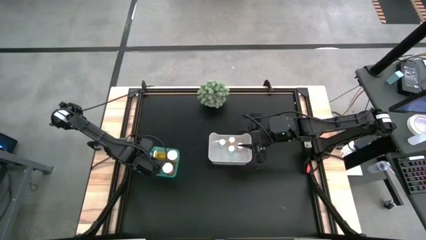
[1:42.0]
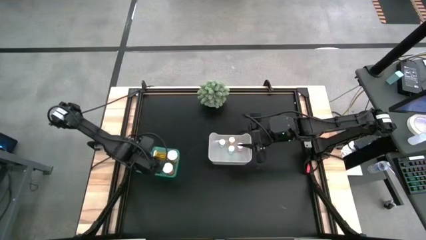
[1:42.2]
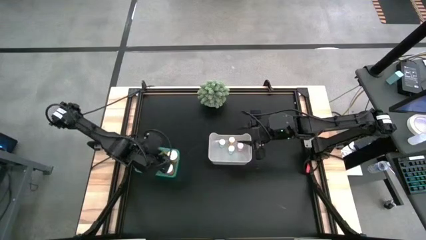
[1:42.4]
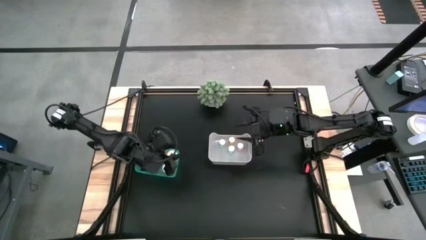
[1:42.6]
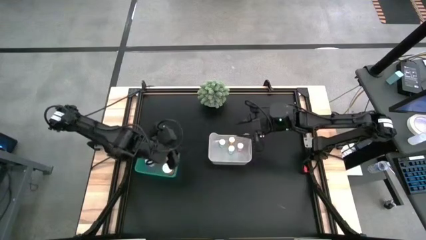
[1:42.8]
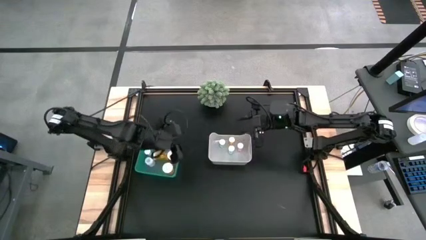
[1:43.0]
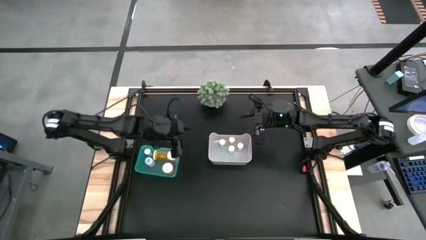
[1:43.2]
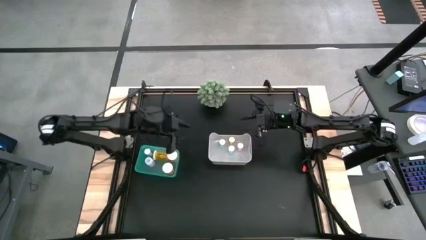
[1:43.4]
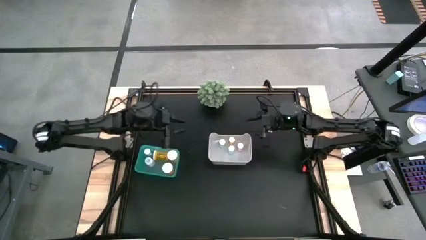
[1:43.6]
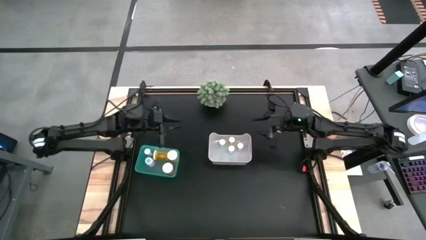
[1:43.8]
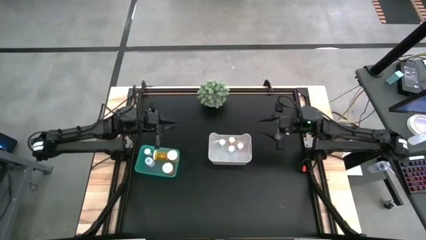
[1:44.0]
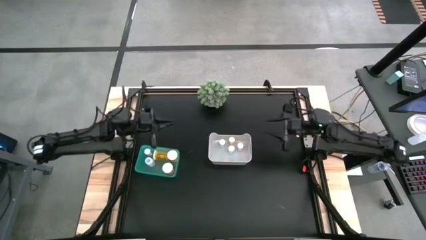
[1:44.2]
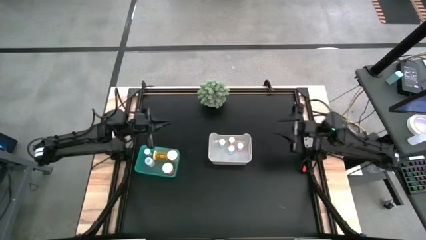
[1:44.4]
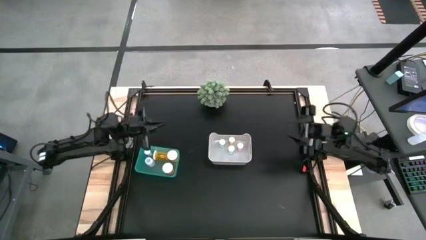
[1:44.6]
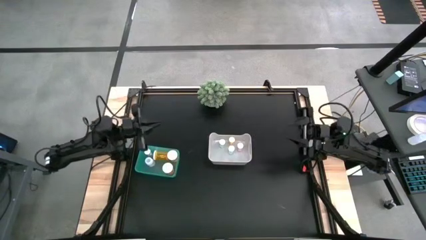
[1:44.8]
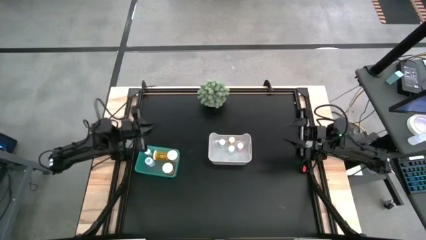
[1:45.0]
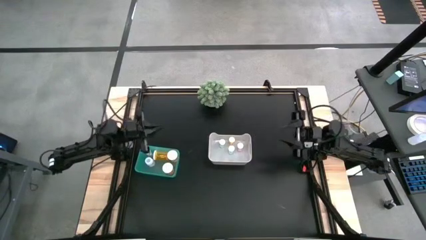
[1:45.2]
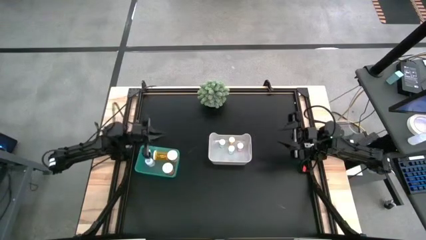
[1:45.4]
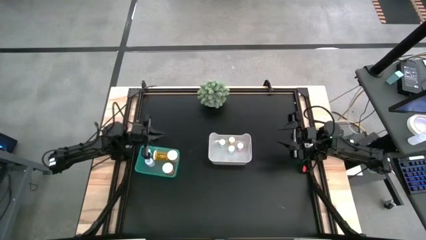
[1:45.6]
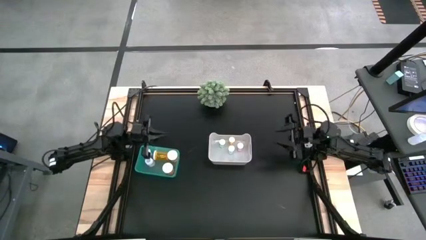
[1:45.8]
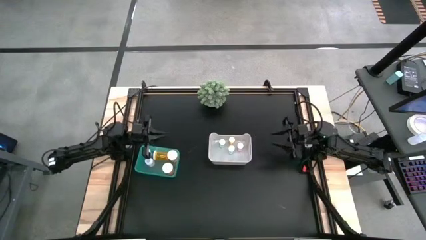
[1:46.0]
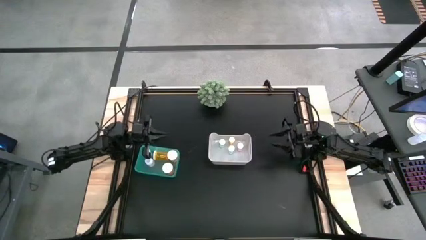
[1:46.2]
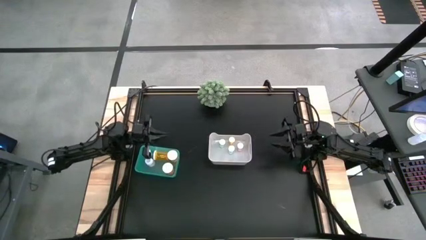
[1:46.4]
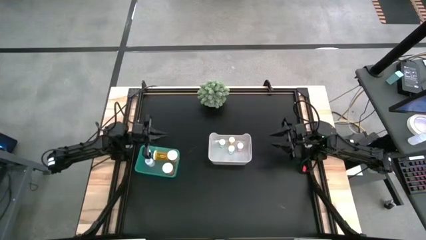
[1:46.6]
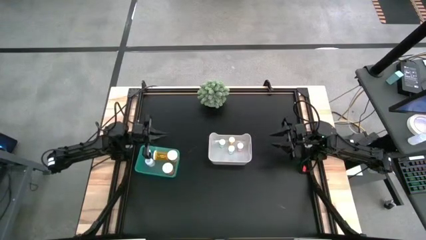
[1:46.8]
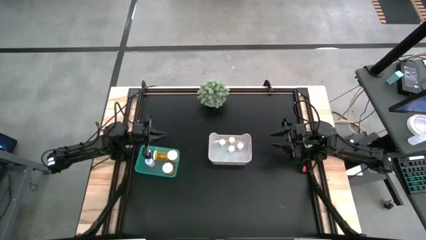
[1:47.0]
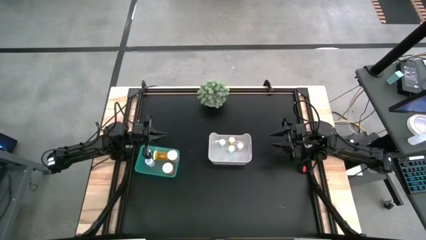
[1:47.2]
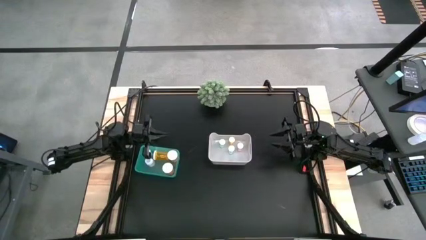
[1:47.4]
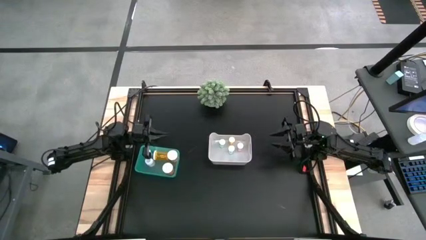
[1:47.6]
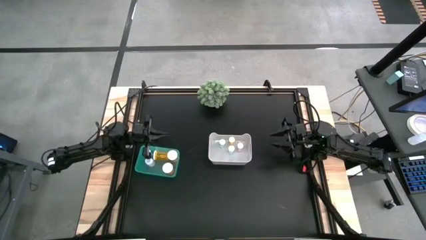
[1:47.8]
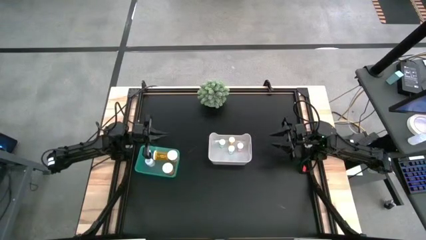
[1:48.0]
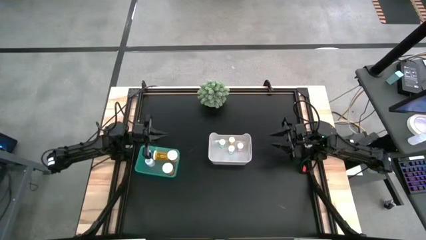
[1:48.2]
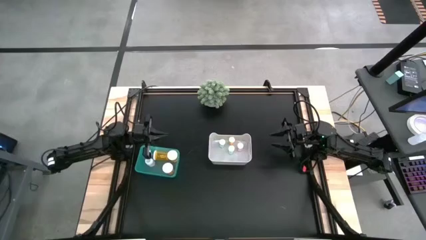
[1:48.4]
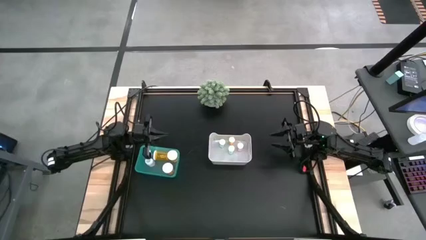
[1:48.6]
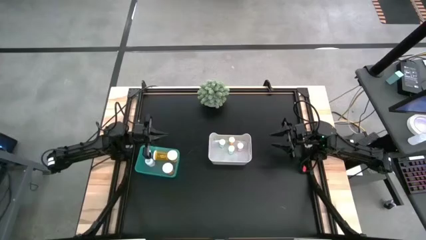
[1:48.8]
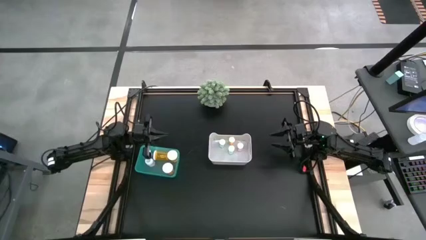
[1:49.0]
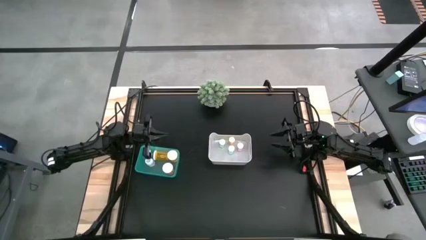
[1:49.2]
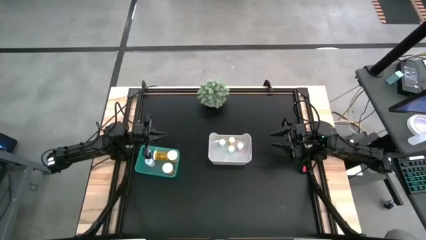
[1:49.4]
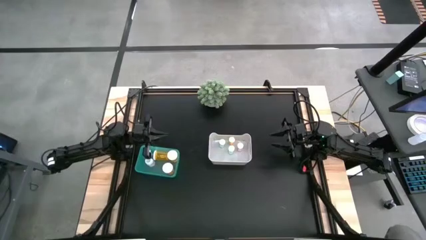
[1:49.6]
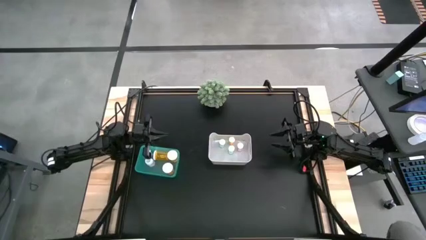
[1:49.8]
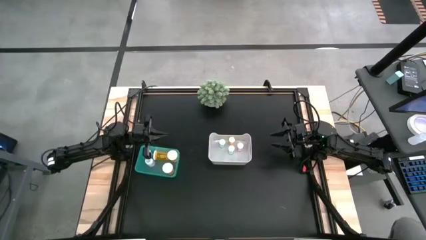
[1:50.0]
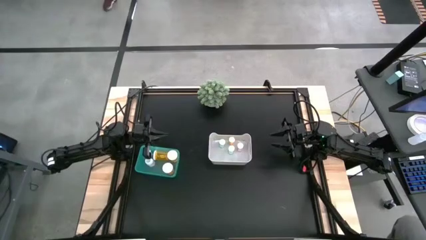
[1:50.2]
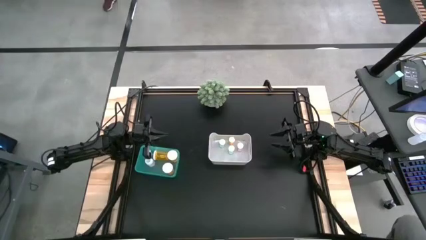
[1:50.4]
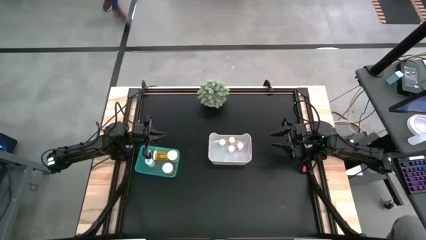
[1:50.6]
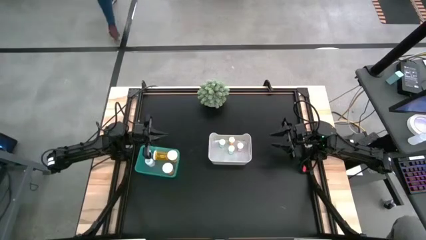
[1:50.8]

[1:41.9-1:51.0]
Task: Pick and place medicine bottles into bin by pill shape (circle, oval)
Return to Home Position

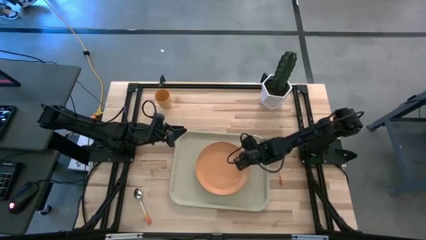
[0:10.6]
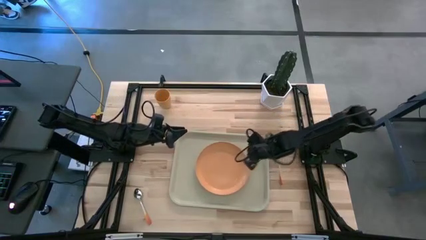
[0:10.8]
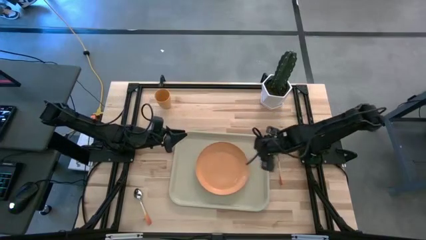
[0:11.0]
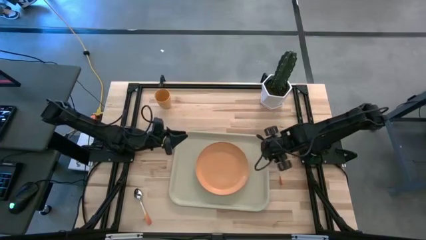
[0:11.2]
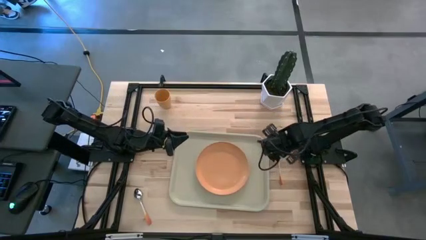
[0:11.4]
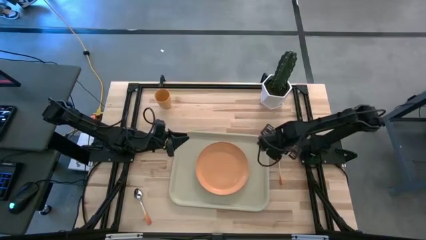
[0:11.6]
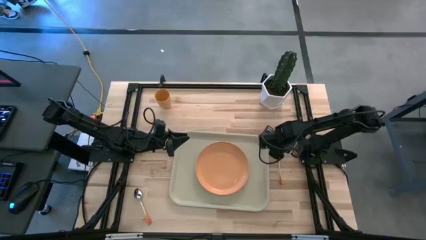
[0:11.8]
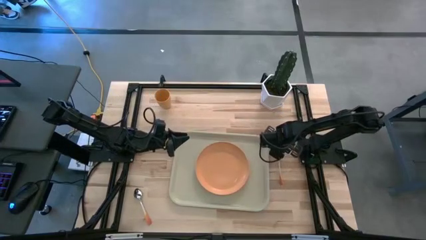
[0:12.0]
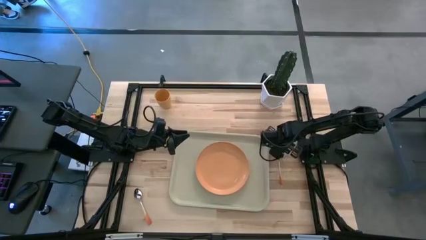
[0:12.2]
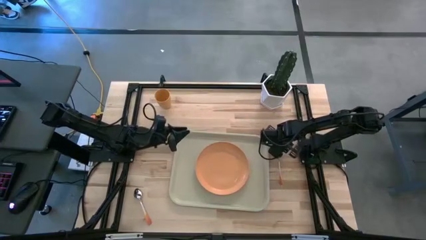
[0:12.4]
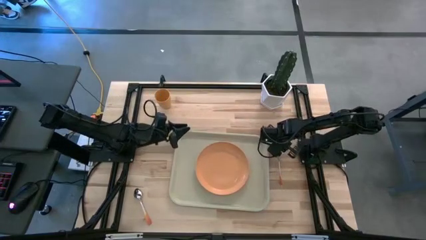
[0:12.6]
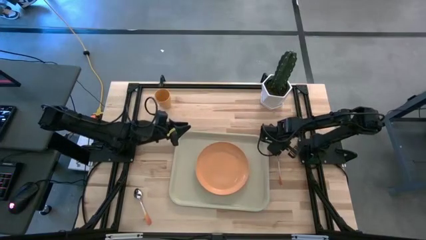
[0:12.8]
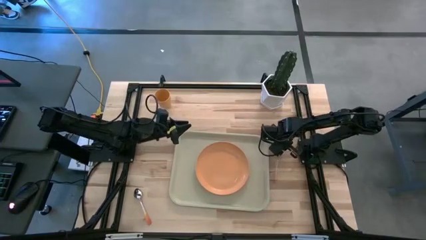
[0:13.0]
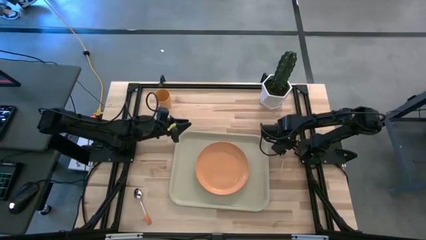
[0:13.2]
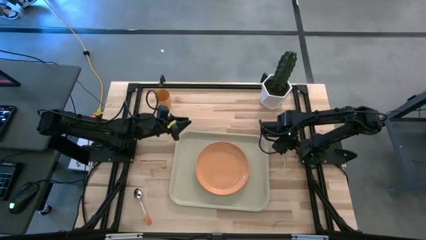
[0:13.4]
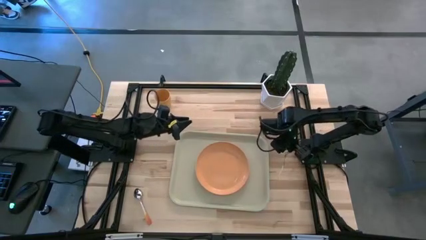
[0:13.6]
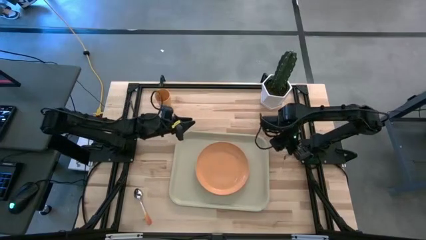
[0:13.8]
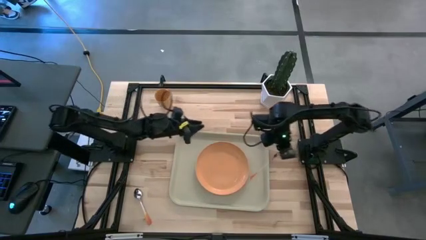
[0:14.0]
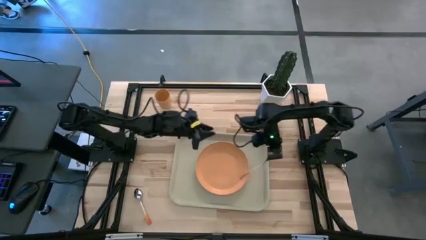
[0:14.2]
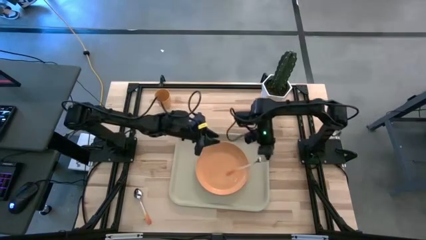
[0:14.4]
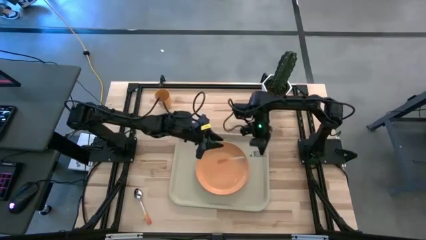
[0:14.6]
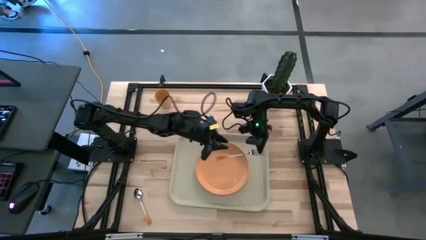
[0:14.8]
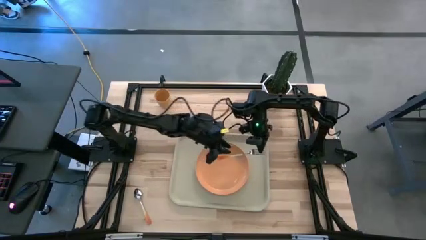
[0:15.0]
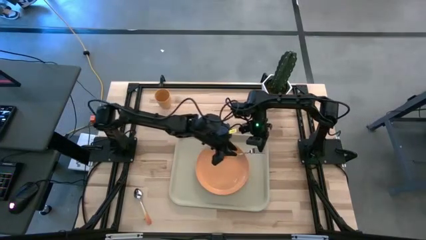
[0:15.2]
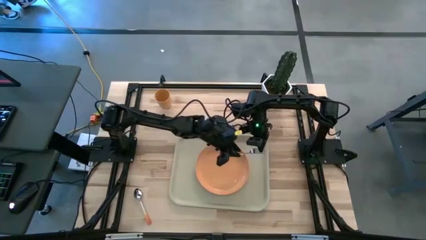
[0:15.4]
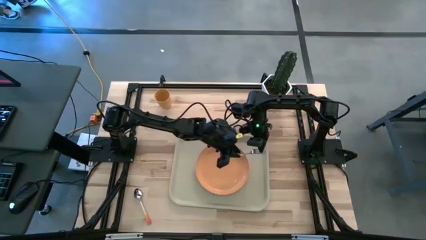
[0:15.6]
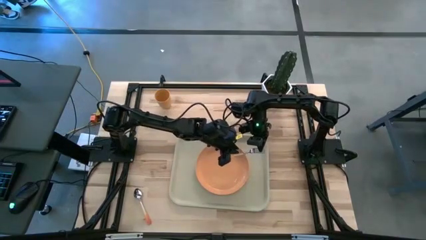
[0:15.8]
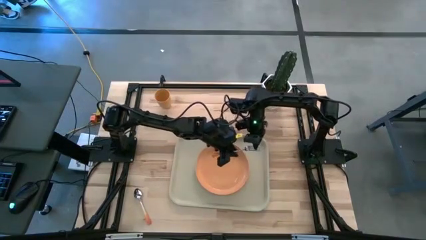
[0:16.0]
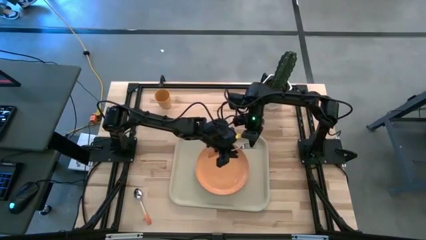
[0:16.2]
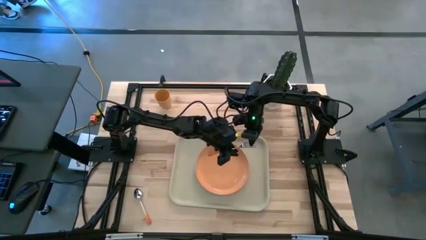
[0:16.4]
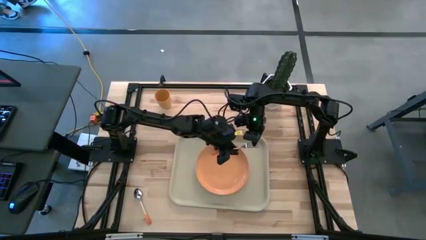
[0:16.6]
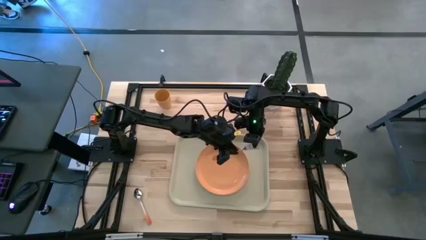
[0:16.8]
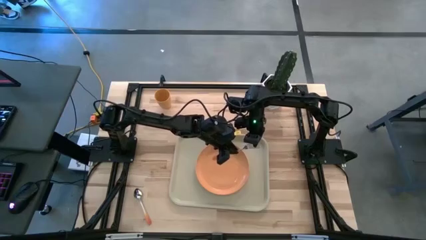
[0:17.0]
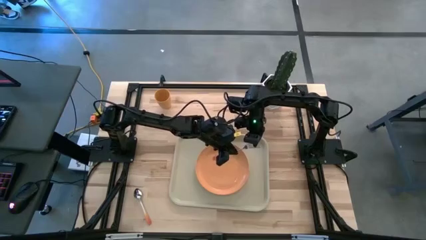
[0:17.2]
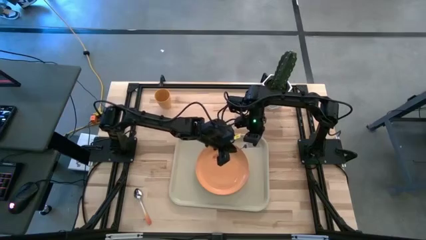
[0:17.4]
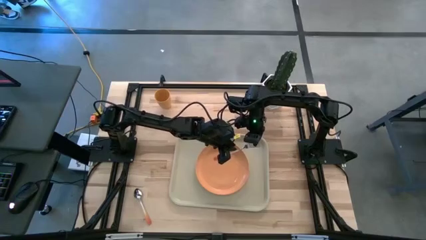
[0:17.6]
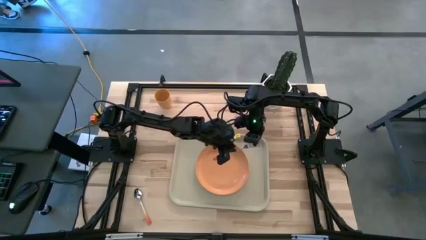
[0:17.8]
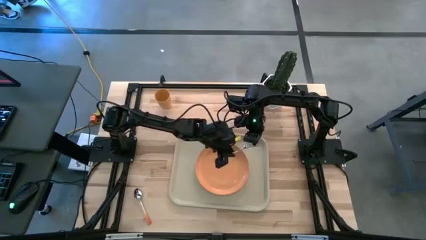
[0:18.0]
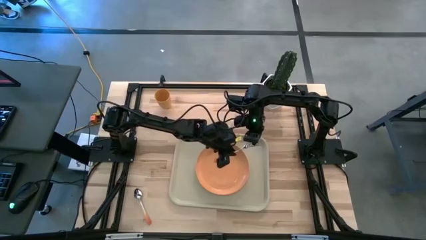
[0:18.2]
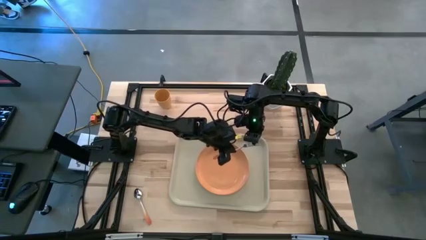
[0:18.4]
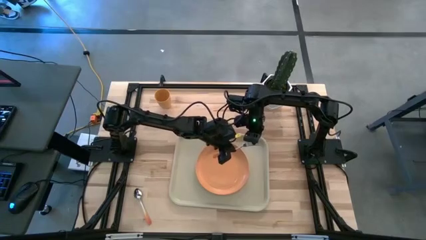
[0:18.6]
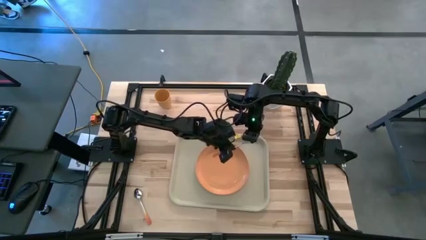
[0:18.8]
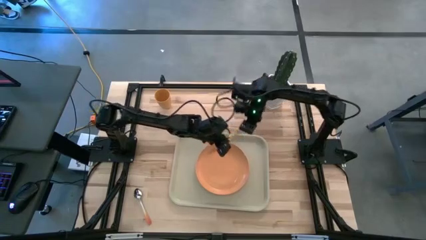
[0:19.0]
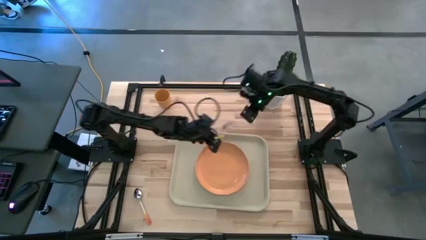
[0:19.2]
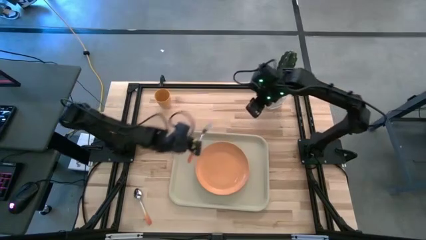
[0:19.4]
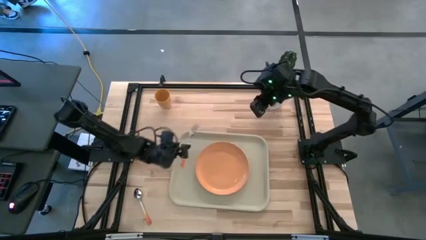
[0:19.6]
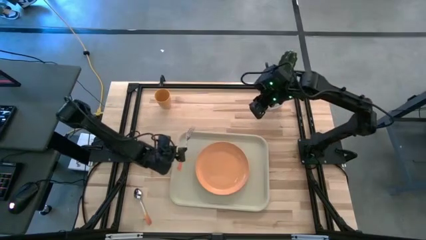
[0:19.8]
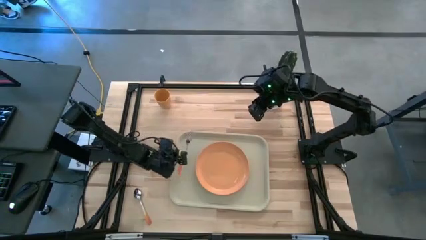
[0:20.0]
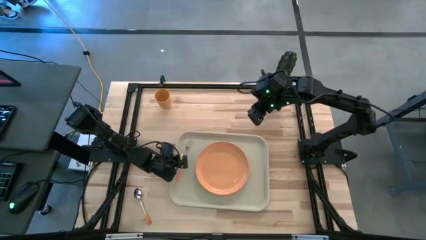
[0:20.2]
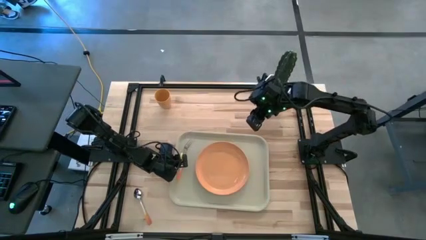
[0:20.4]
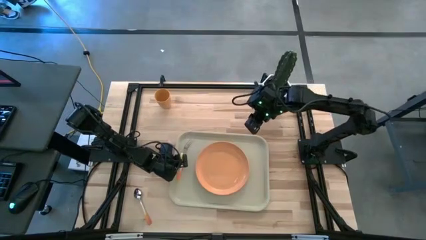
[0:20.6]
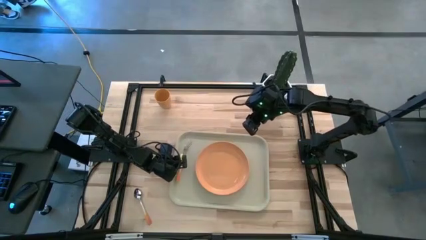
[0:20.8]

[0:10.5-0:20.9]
Task: Pick and place plate/cup/fork/spoon on tray
Put the orange fork on the light brown serving tray to the left side of orange plate
